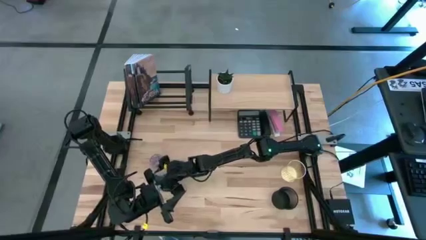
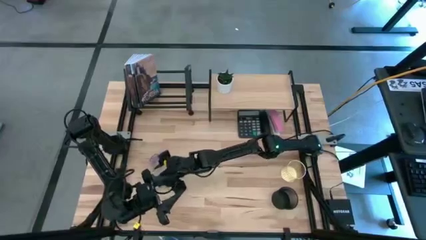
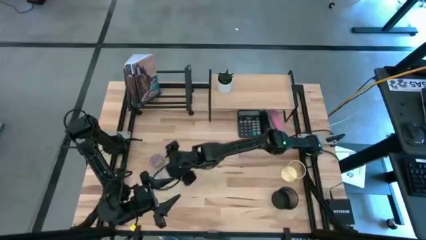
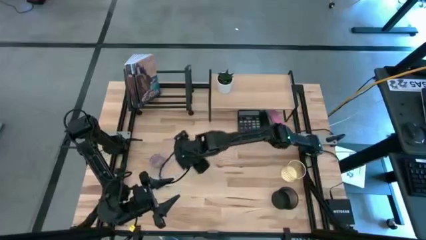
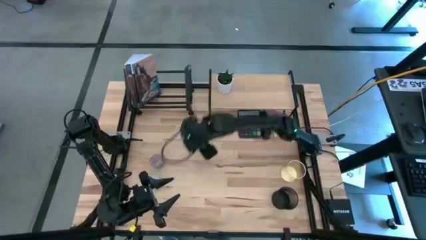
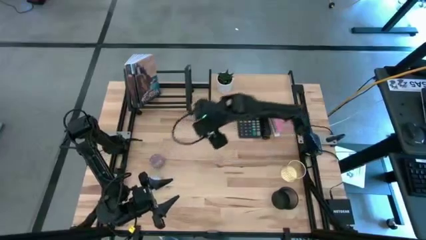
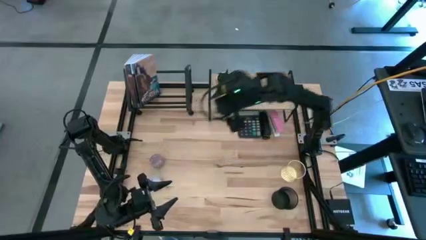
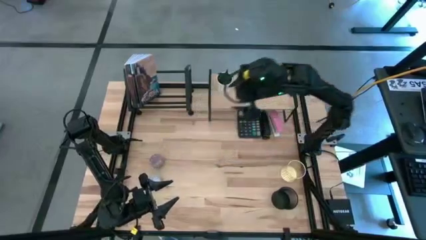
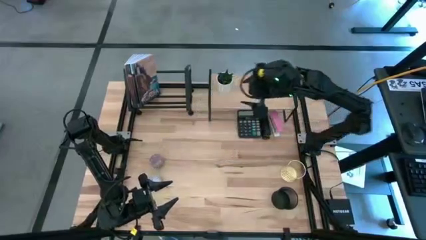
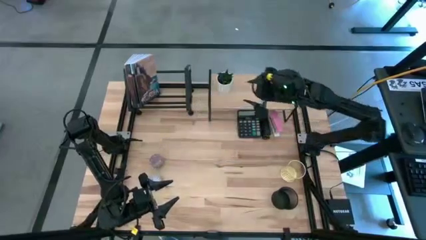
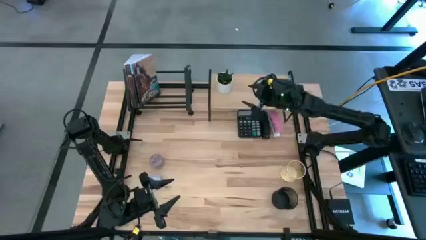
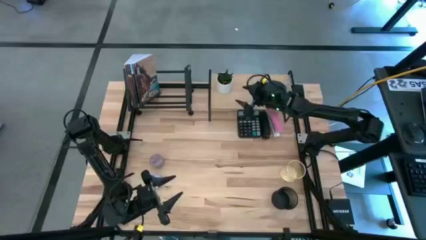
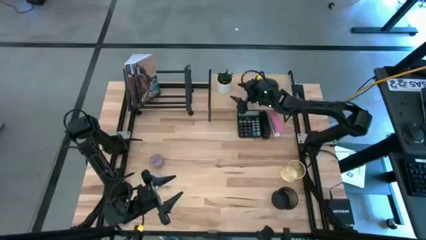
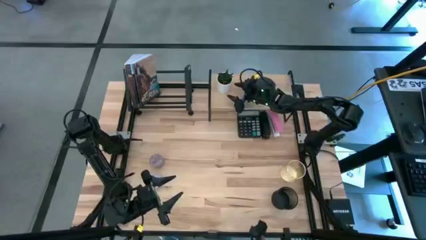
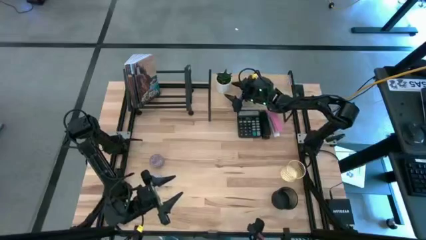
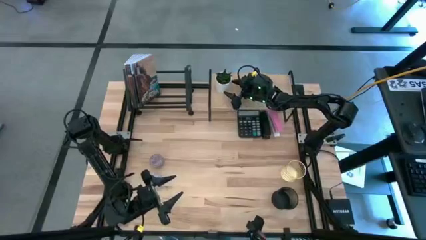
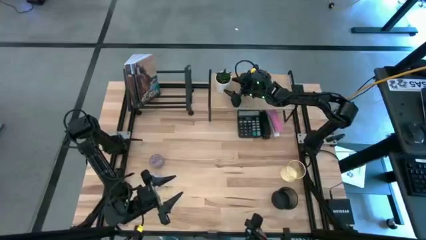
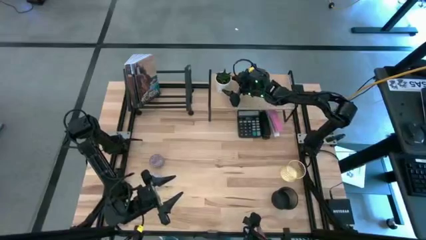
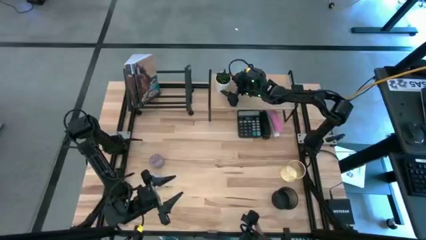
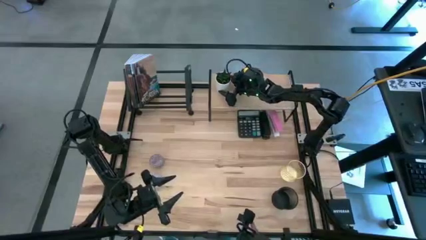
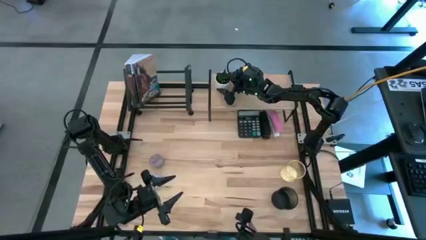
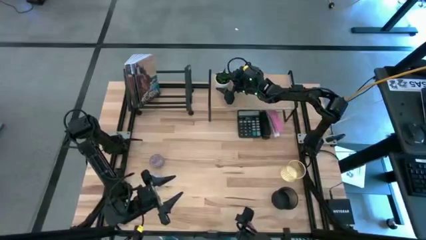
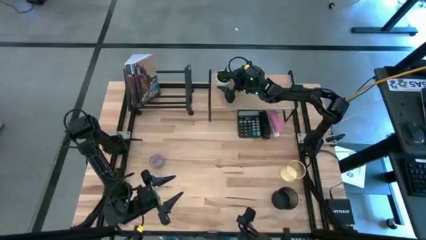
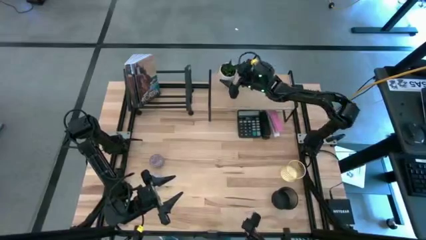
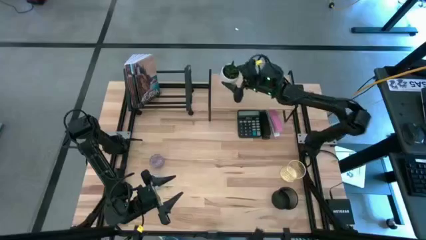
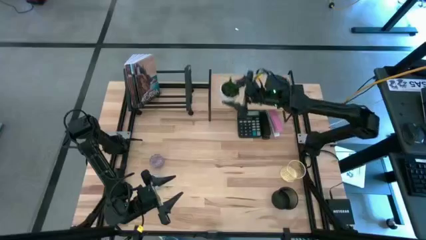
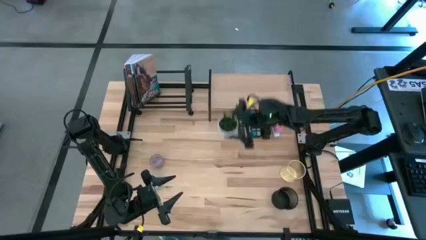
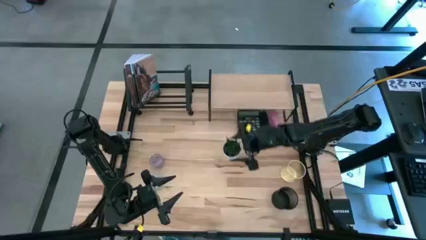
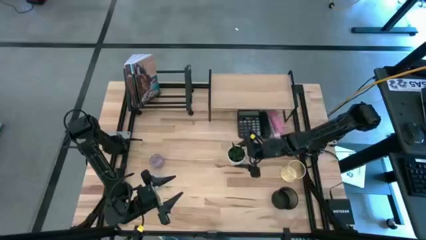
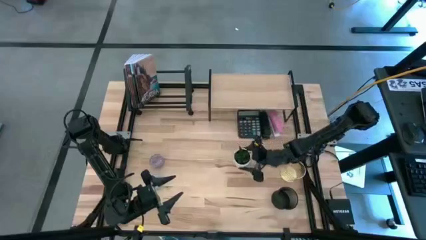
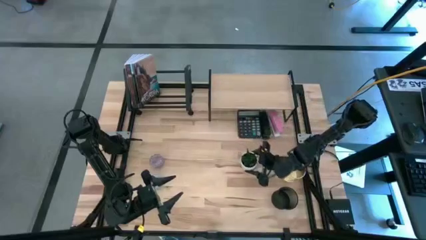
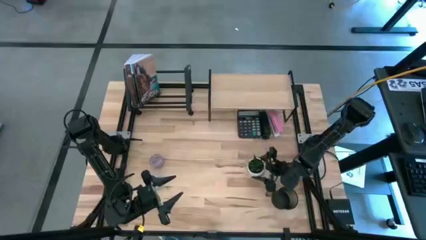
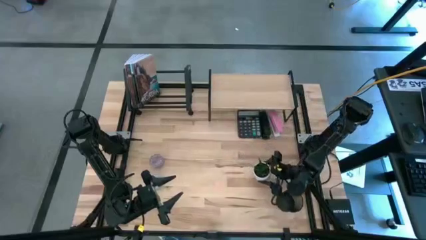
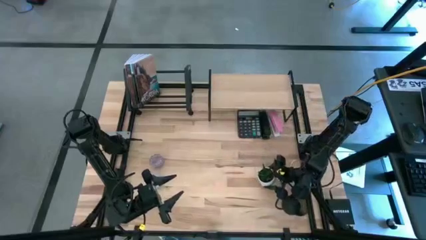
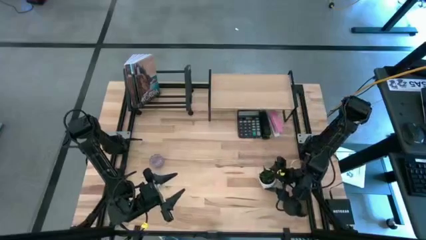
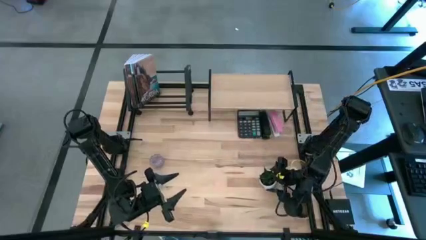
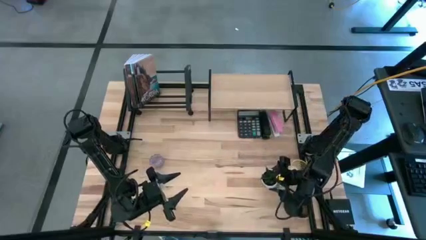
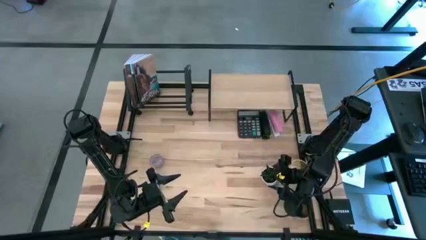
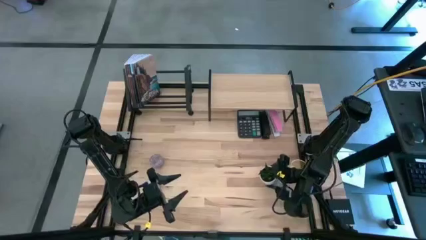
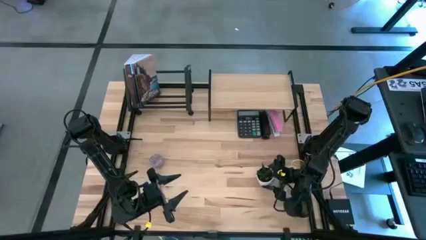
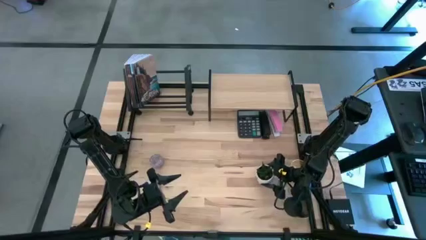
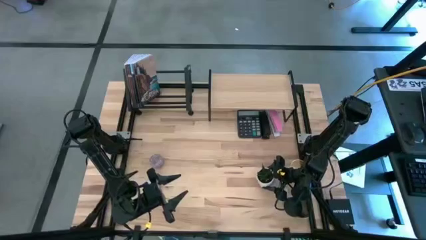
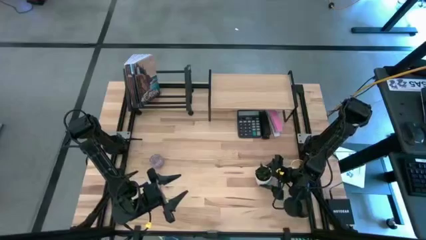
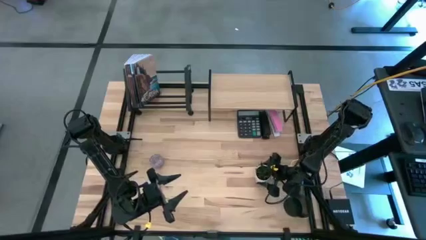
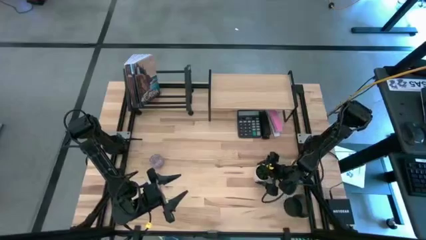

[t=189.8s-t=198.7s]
Task: Stock shelves
Remove the potted plant from the shelf

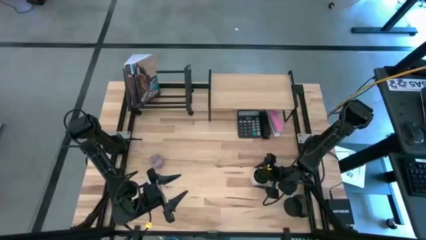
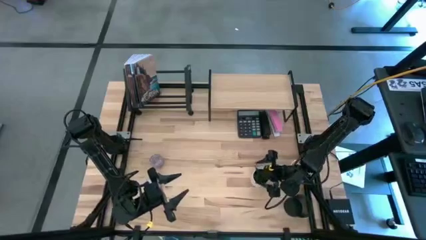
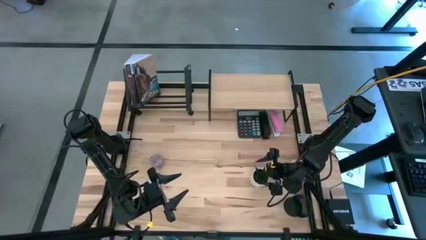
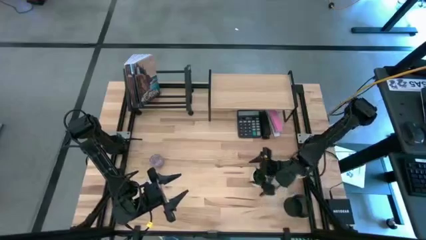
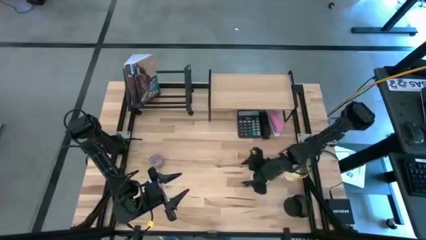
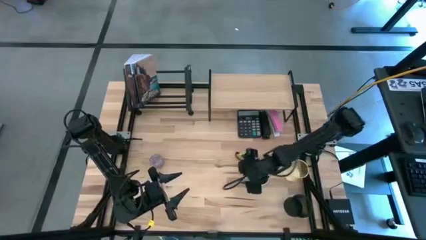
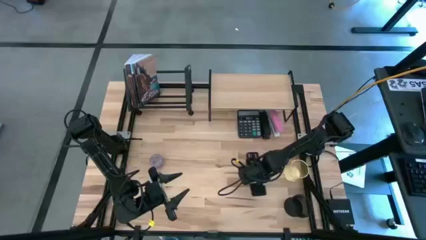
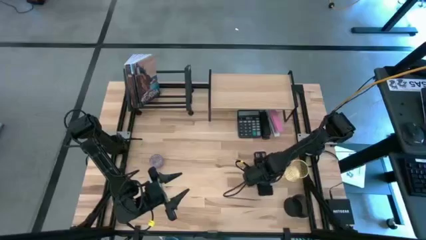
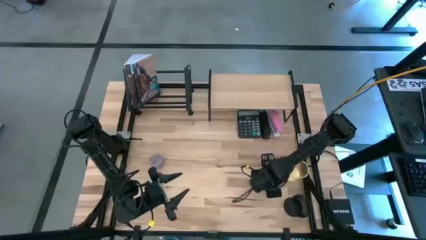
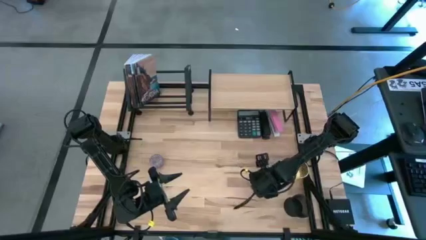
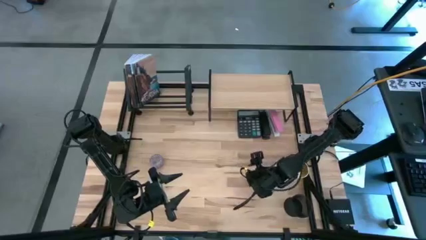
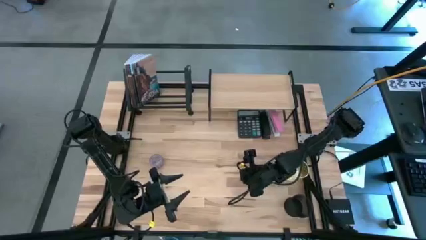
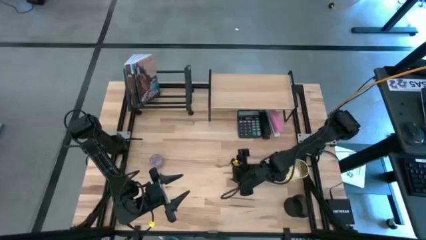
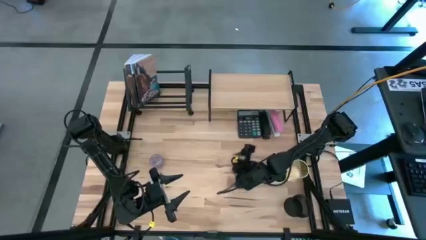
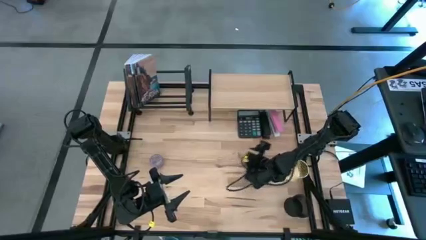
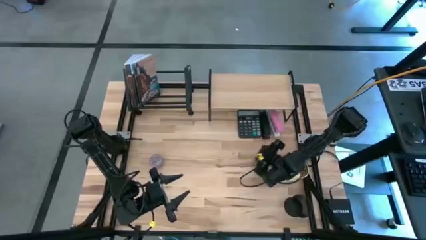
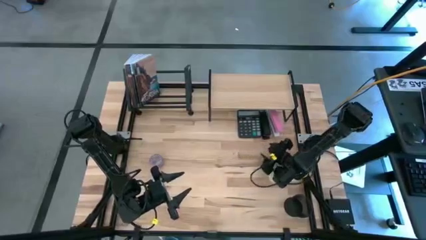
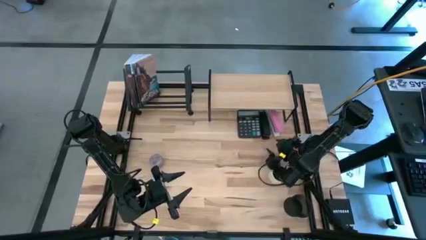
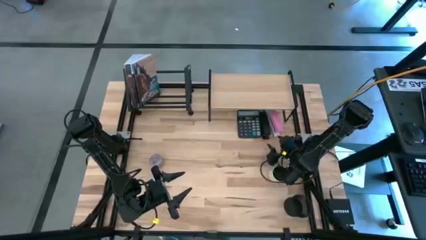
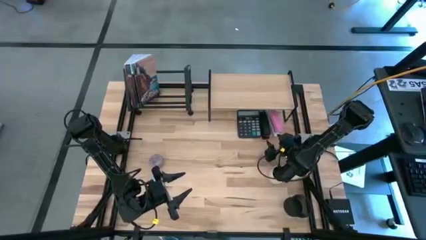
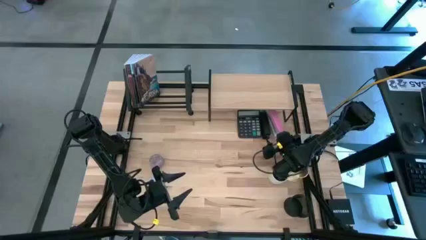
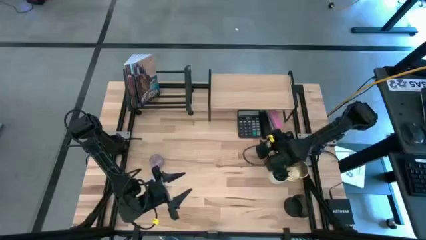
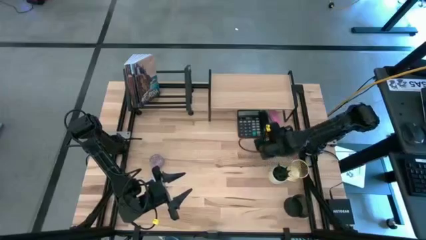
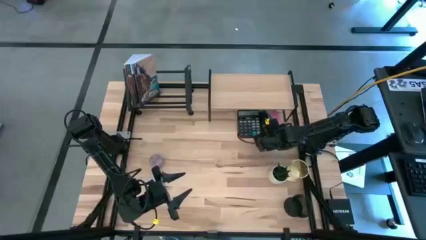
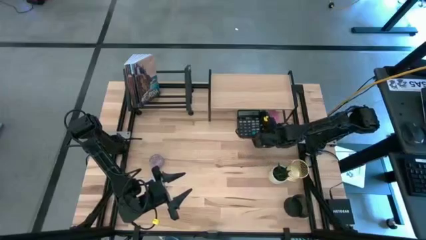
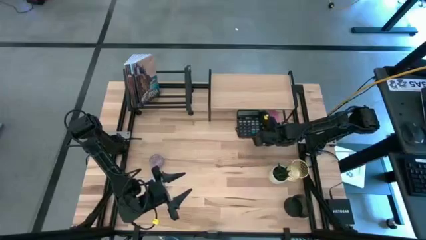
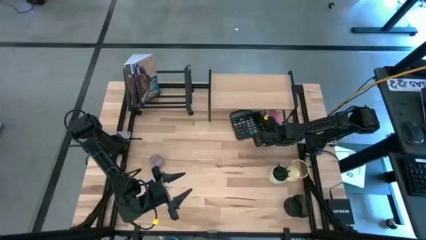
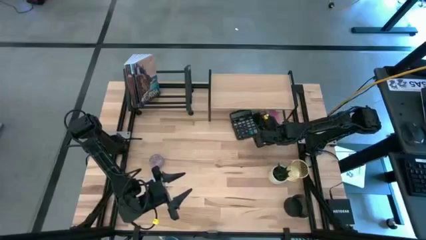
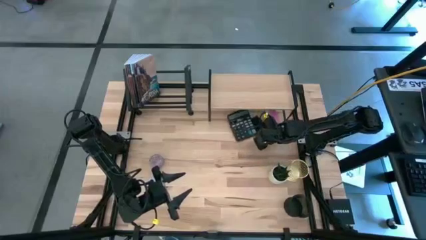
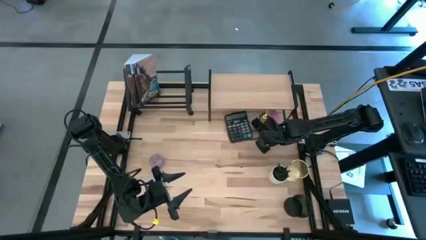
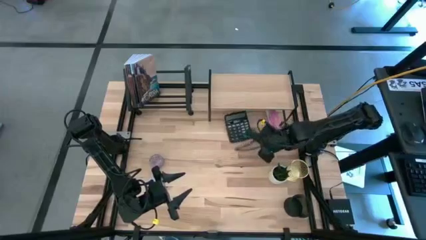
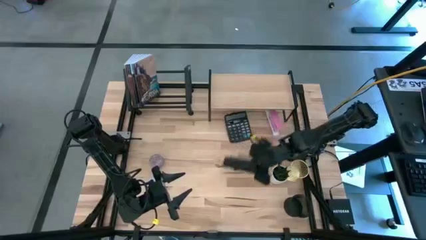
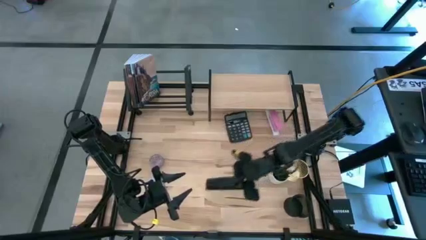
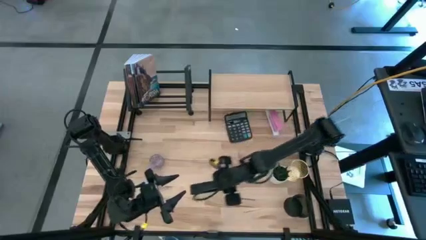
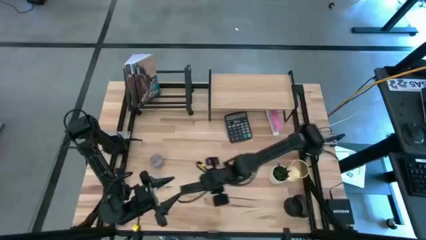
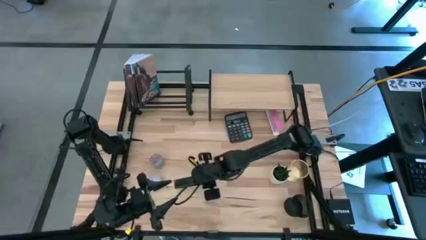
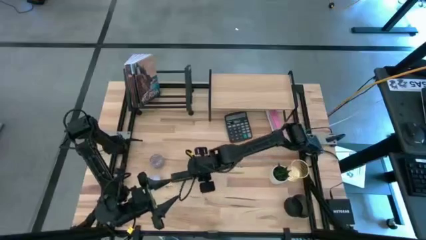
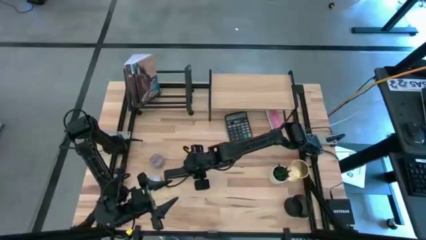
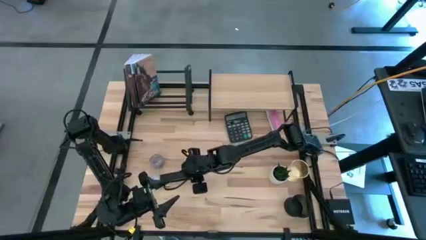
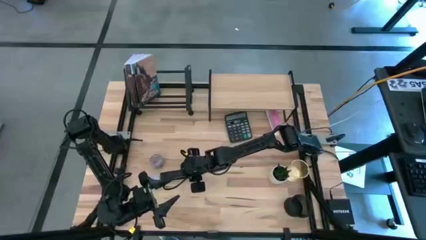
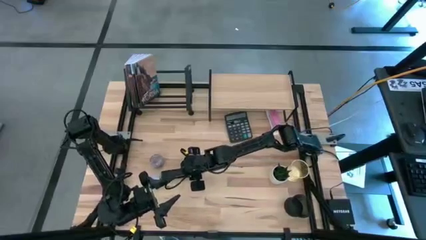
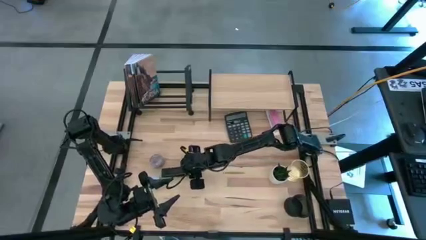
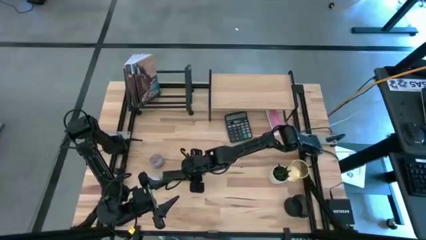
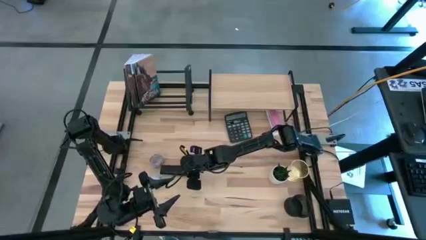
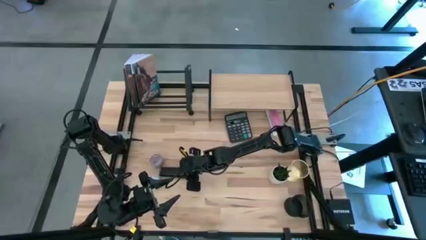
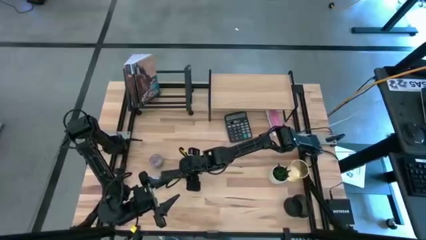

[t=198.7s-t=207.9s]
Remove the black stapler from under the shelf
